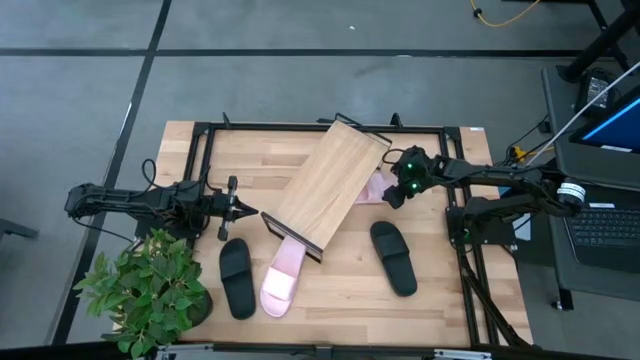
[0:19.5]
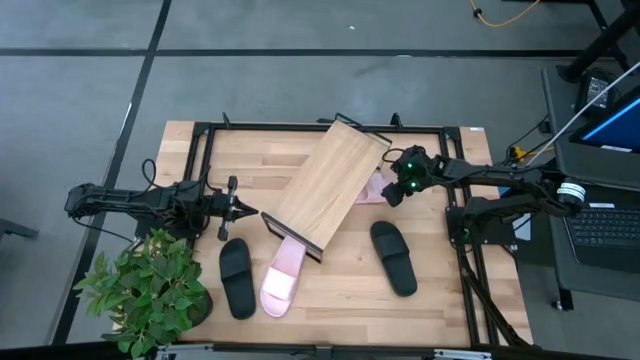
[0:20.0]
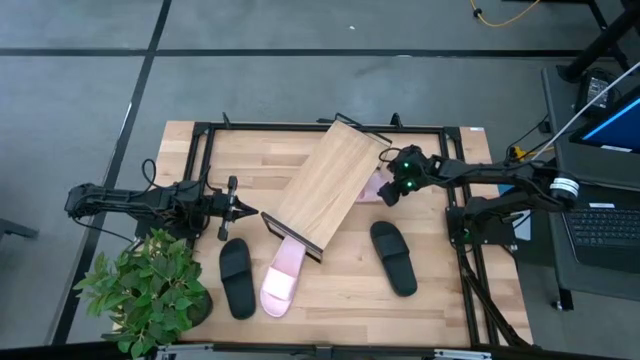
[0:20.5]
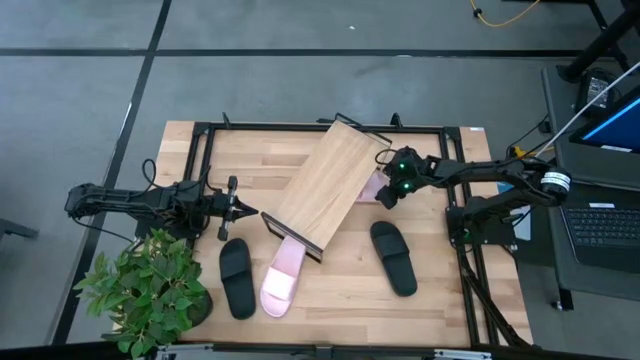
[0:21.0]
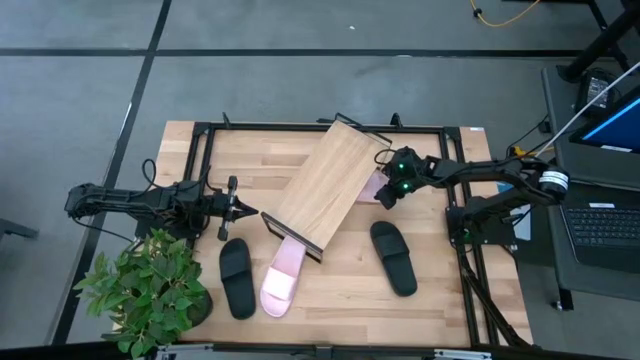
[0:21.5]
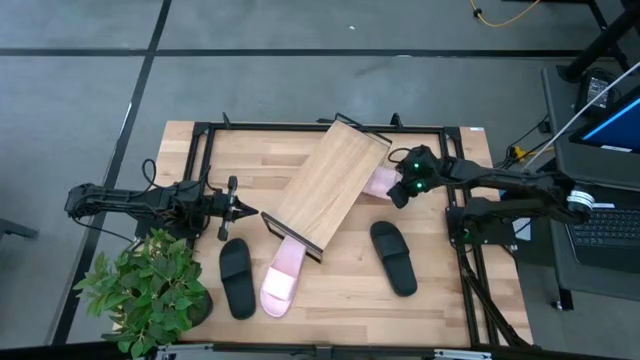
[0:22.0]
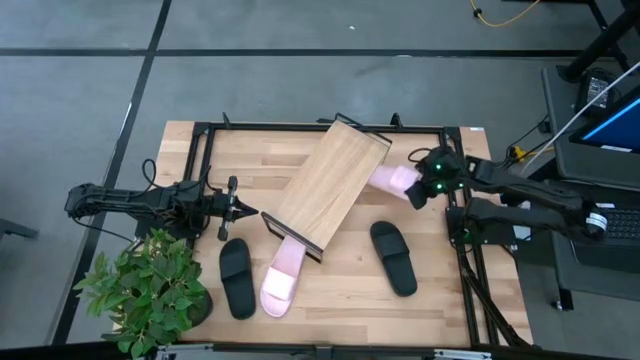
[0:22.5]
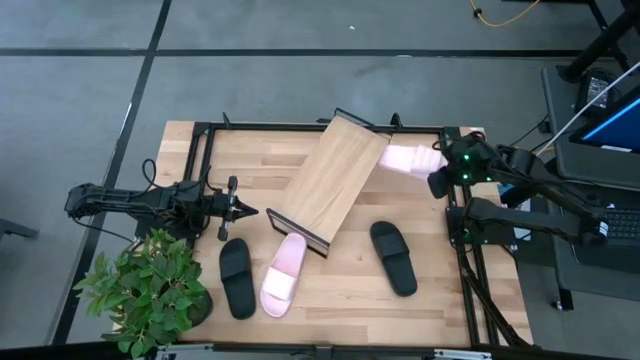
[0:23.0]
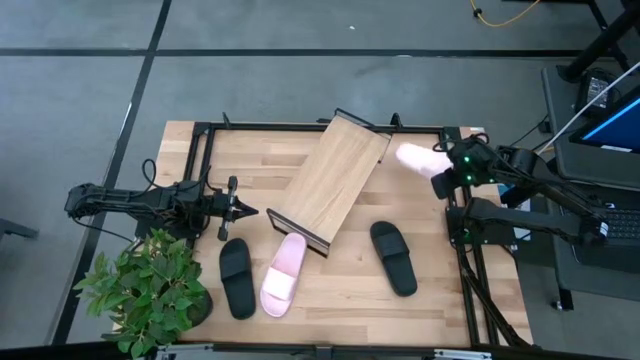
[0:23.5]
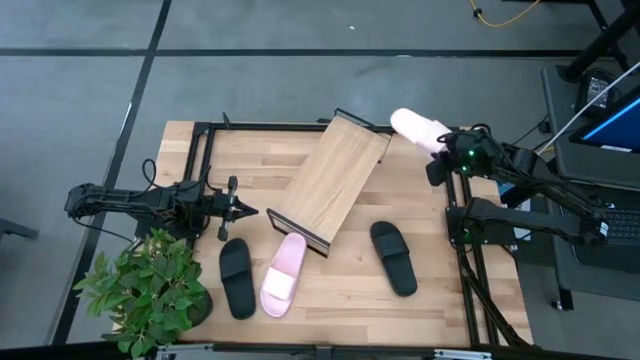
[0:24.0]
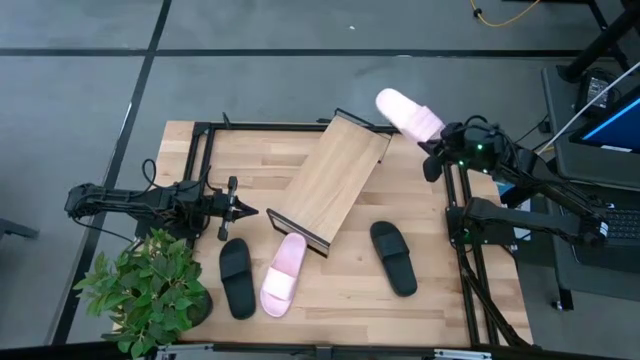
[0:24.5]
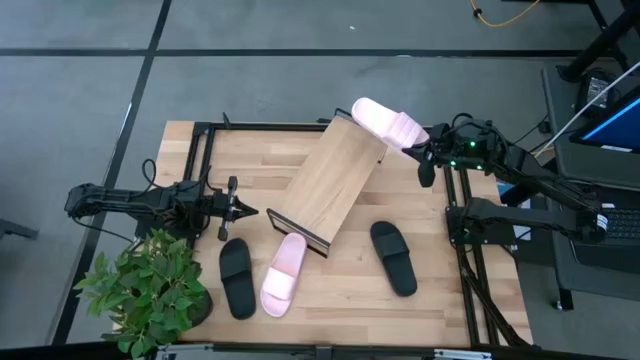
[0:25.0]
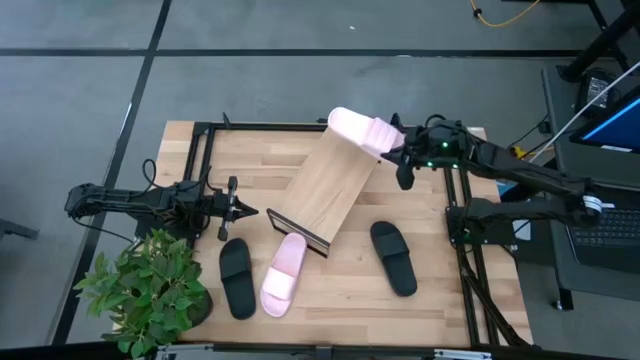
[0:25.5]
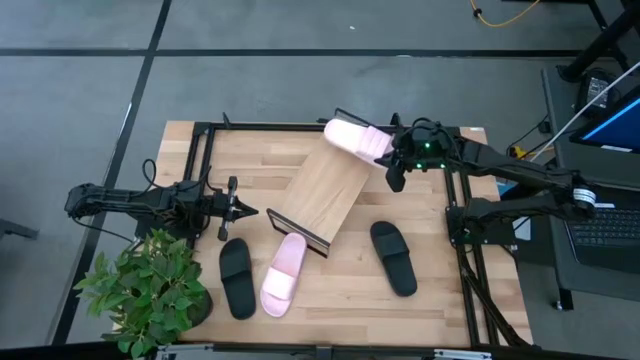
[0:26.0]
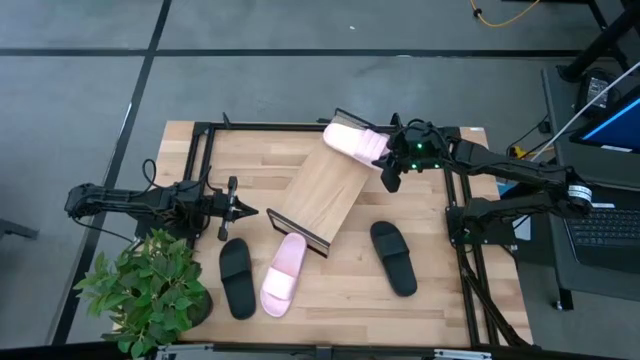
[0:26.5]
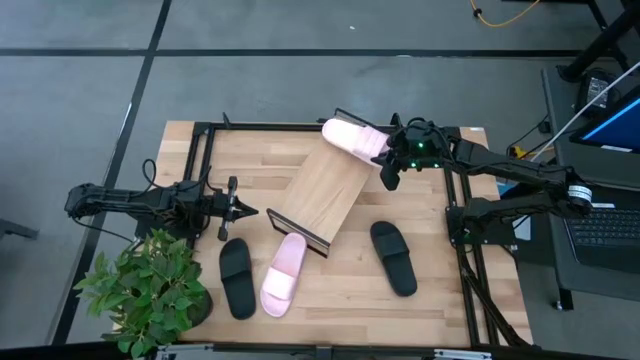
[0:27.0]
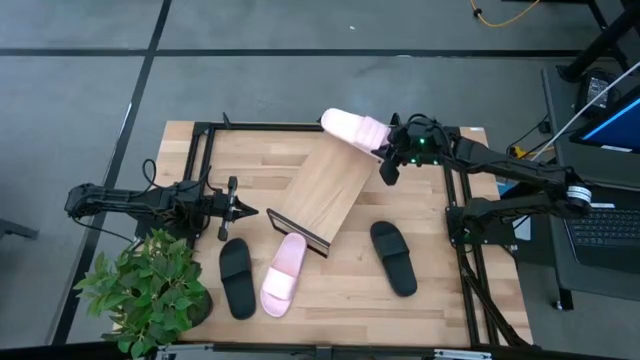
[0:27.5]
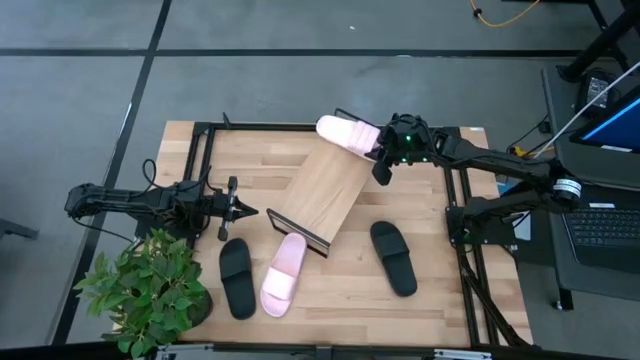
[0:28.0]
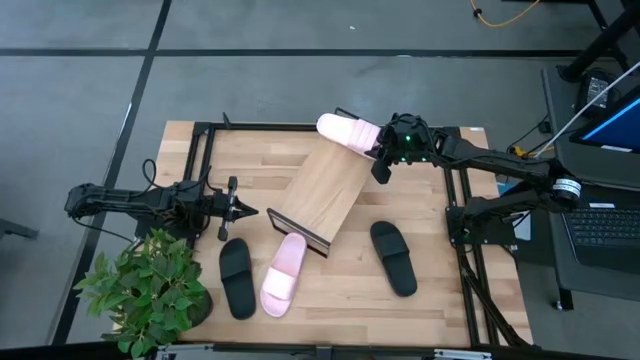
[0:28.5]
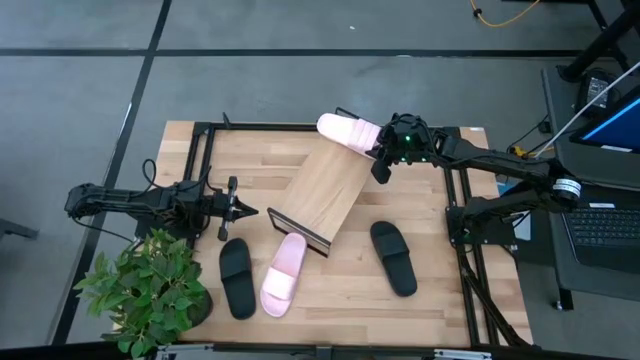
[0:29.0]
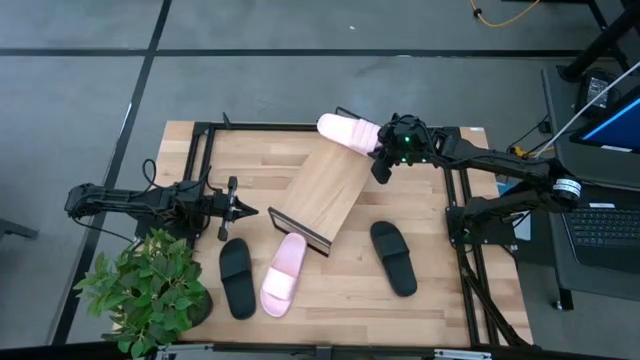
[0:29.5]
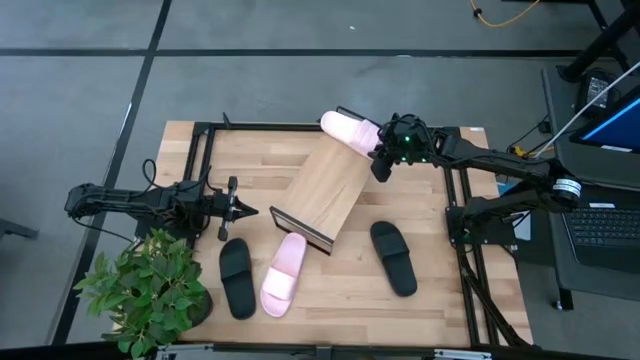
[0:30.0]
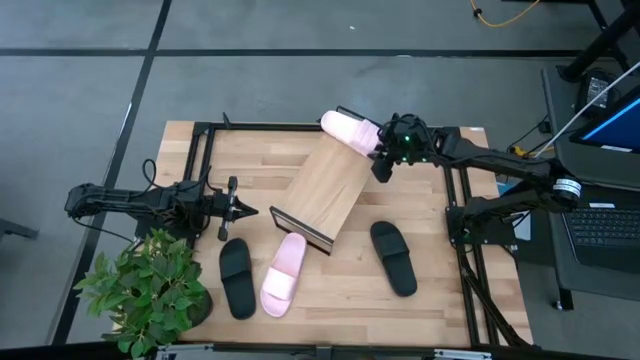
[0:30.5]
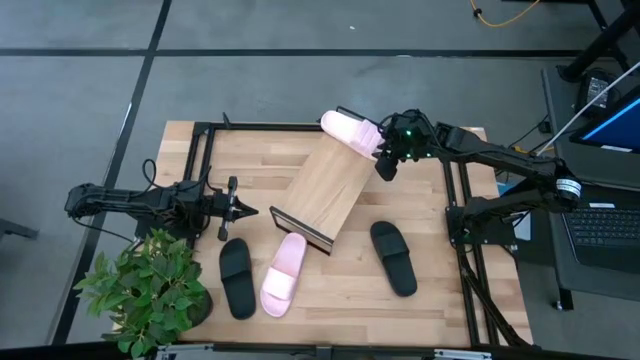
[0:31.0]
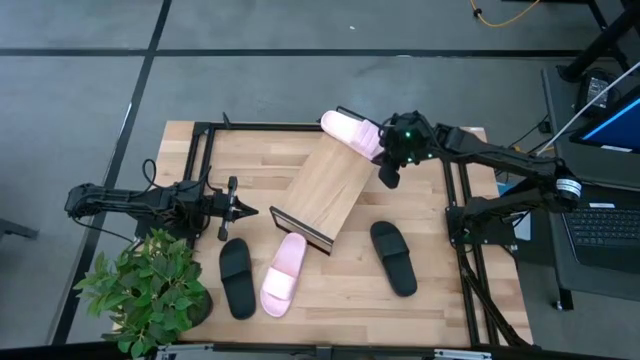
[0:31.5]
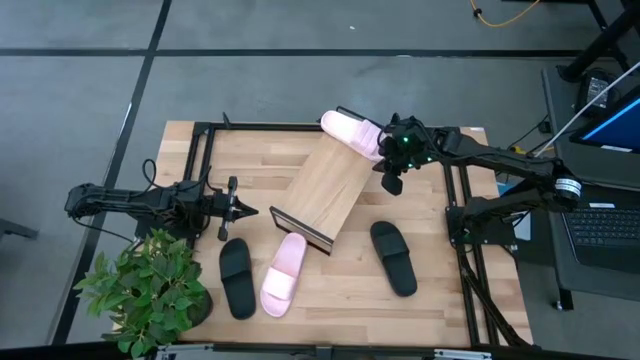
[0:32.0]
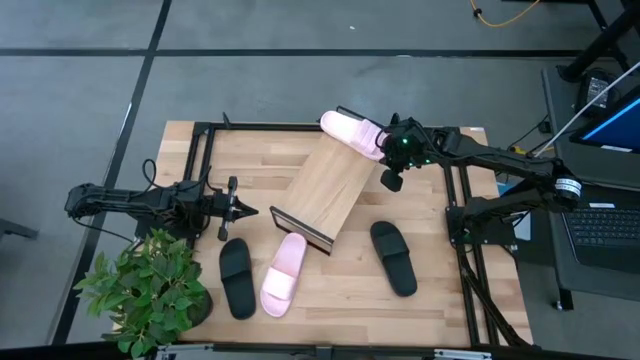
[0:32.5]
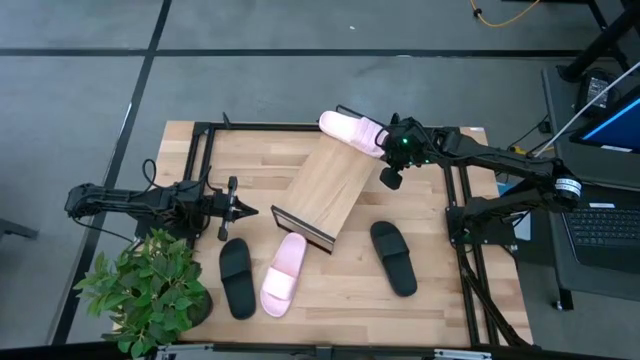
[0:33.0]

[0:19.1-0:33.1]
Task: Pick and place slides into the shelf
Put the right pink slide on the shelf

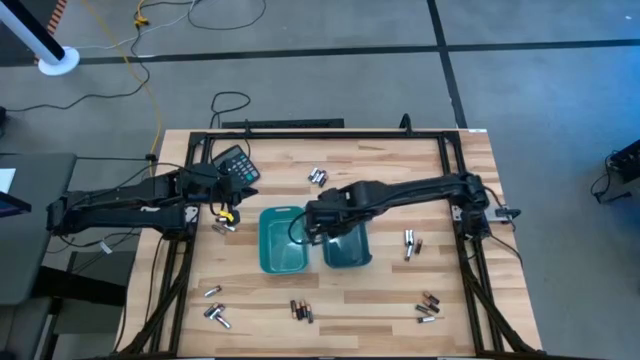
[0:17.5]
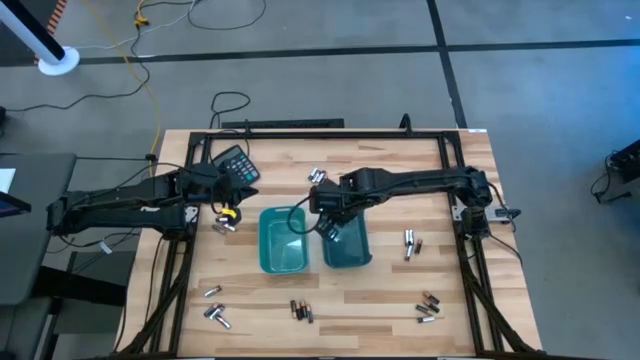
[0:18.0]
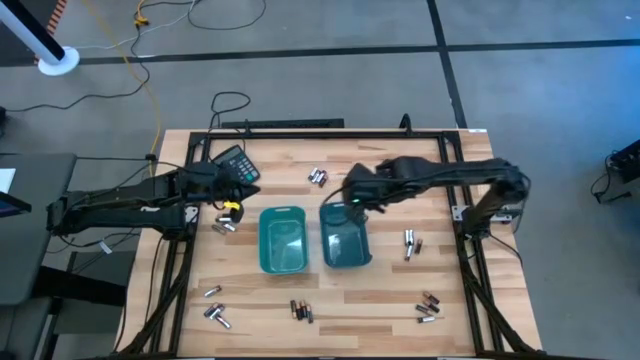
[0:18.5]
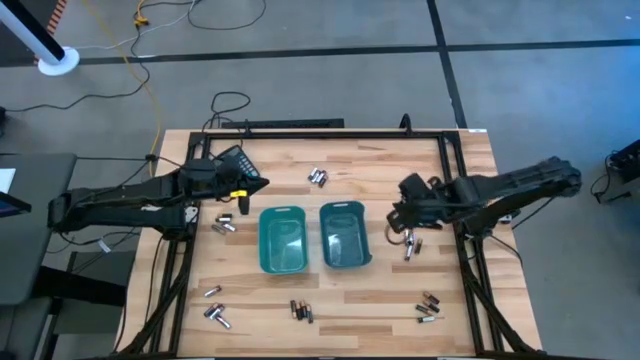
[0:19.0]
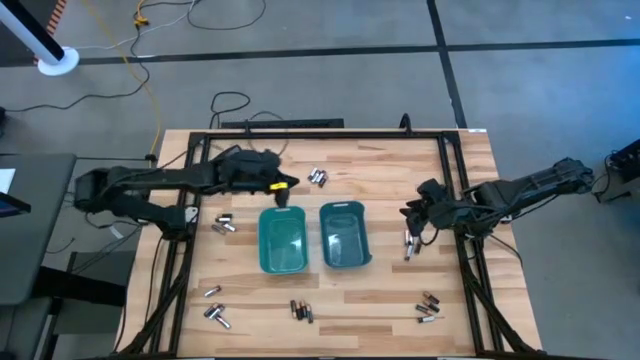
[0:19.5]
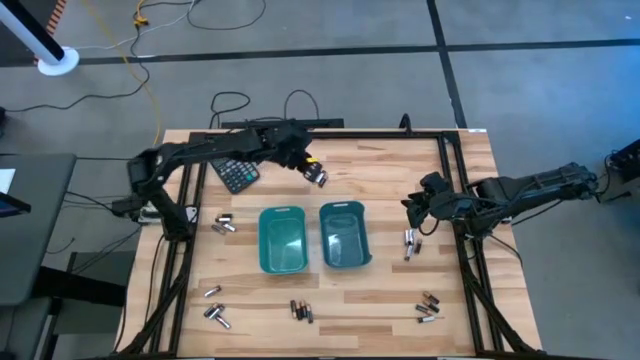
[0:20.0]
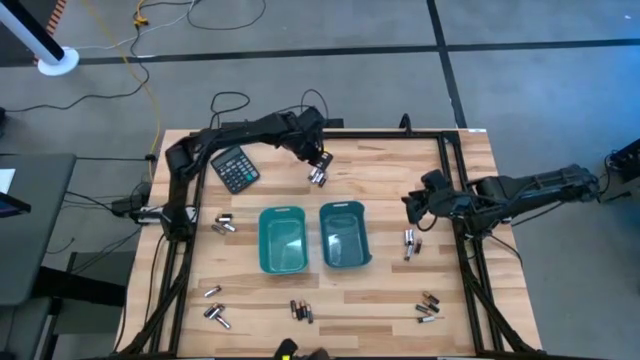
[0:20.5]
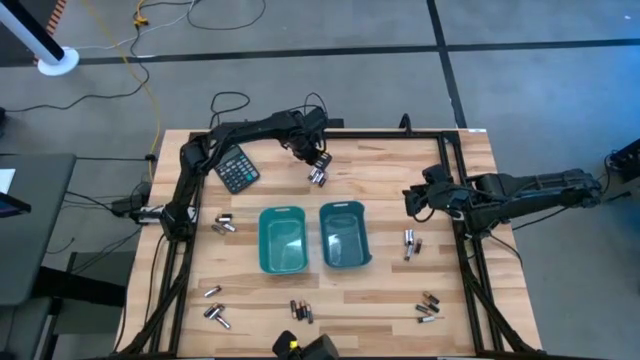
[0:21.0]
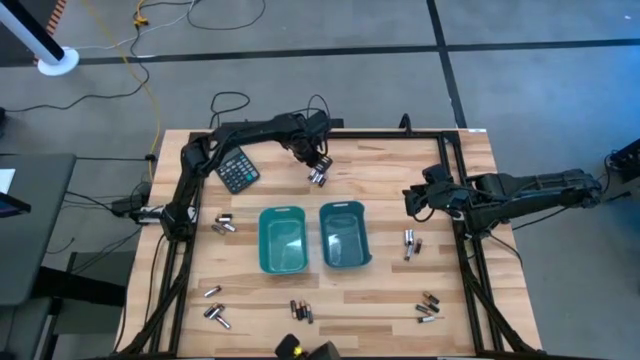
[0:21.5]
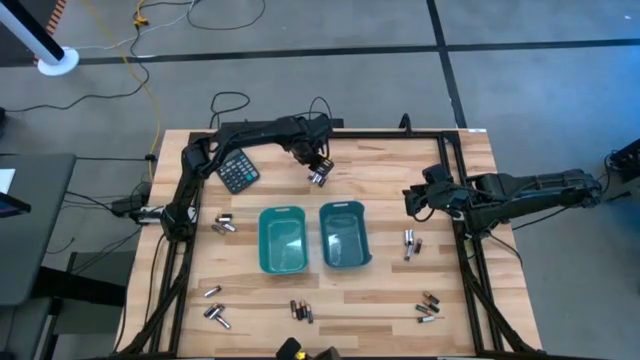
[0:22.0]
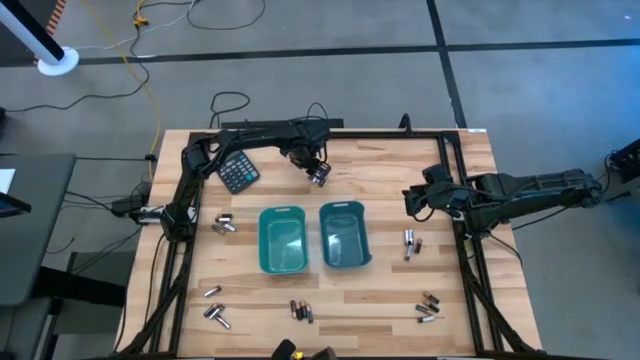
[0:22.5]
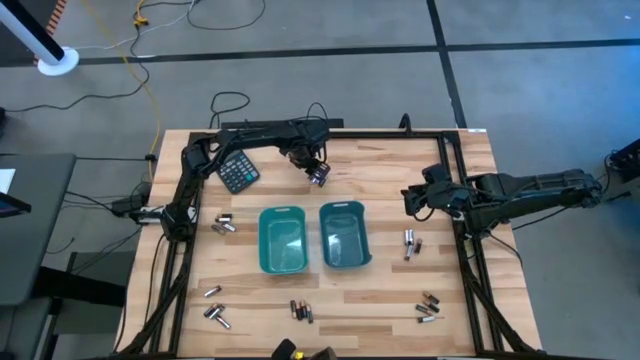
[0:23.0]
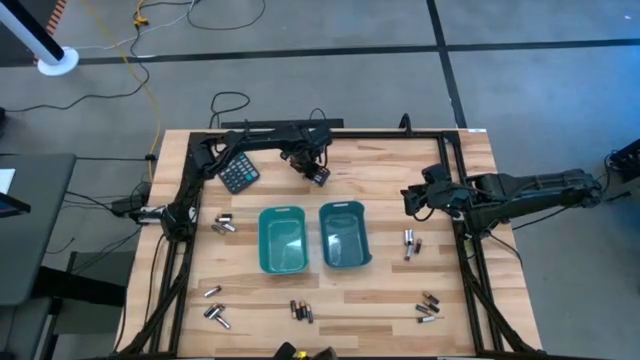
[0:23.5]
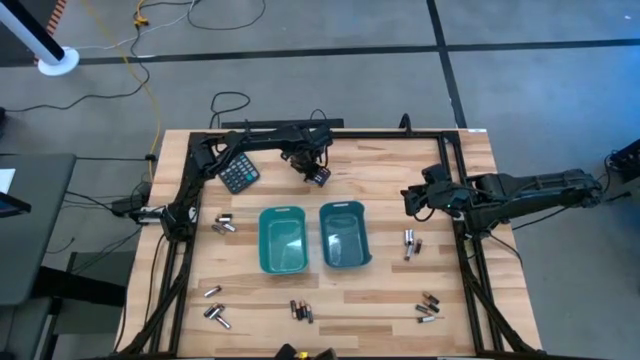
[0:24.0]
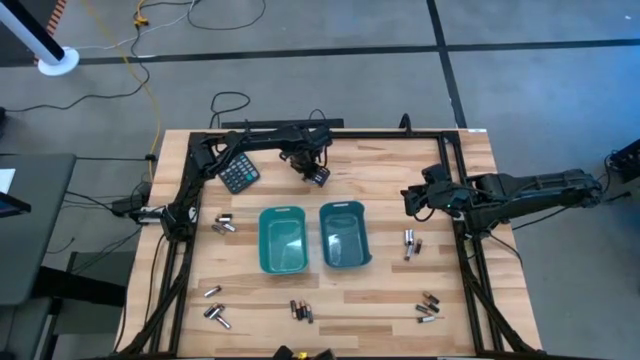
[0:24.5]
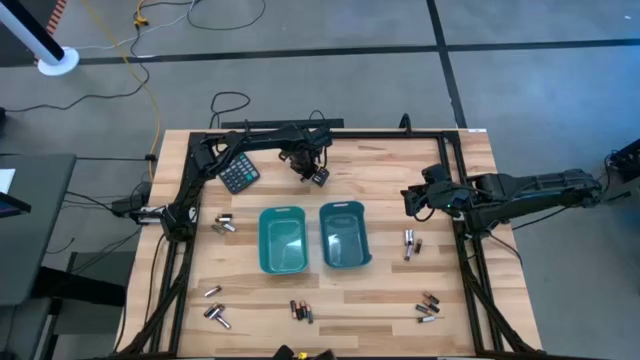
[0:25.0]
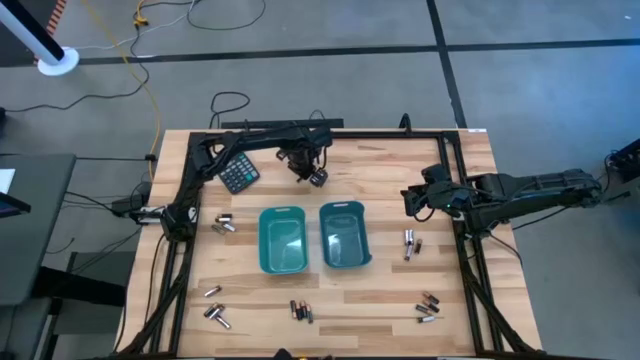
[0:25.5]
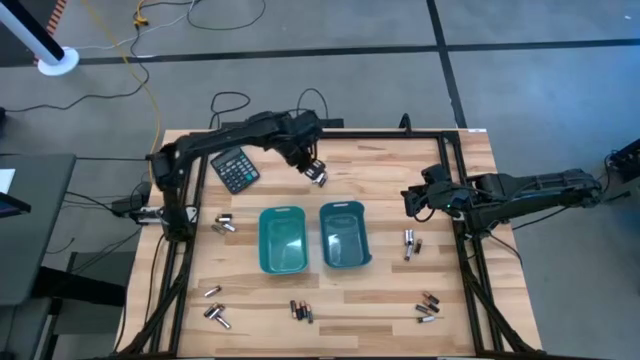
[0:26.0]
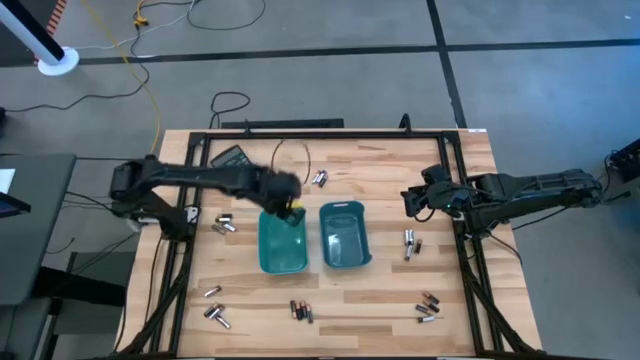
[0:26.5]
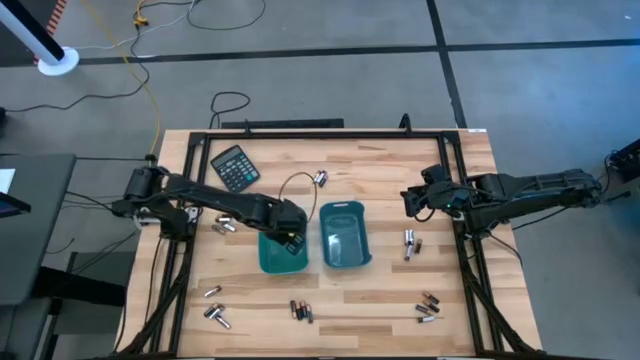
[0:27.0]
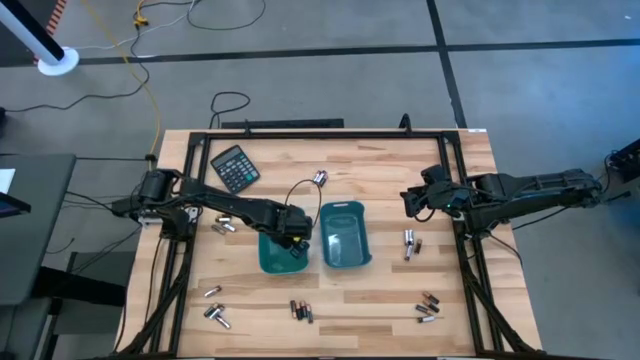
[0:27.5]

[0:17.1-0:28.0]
Task: Sort batteries
Put the silver battery into the green bin
